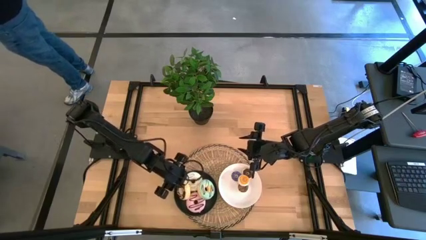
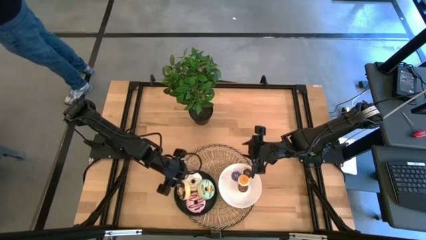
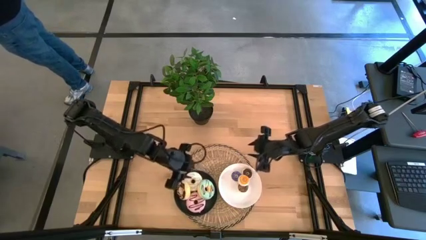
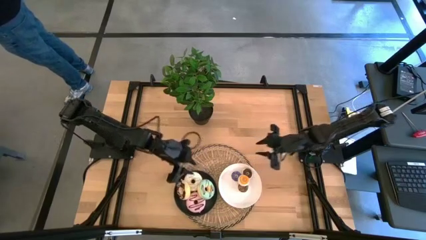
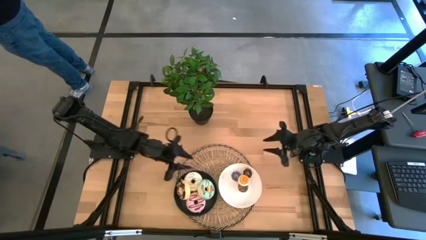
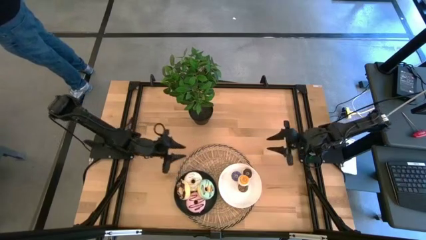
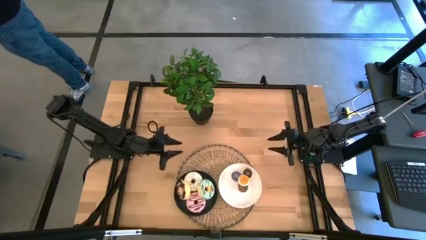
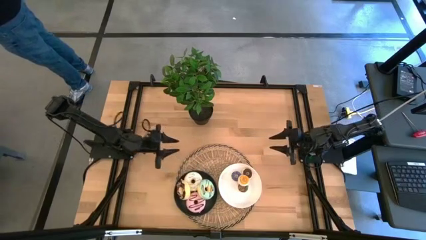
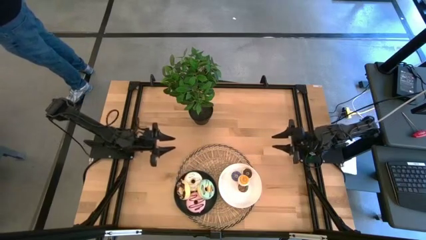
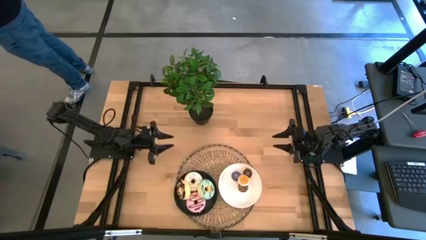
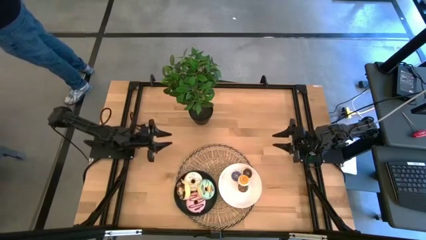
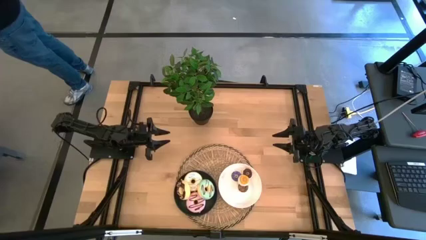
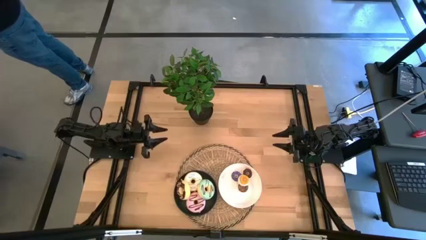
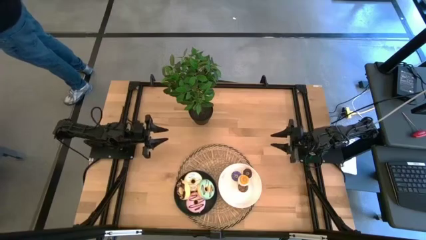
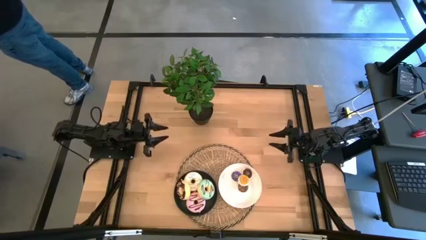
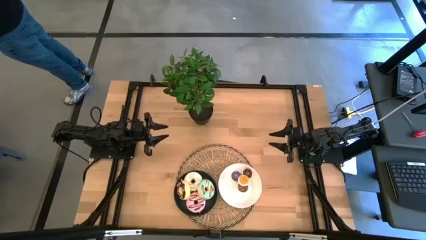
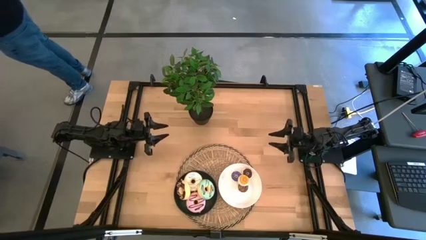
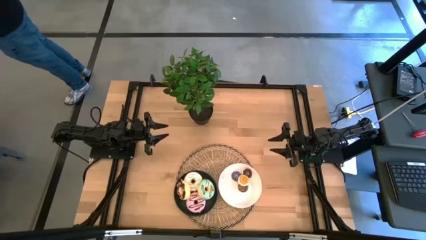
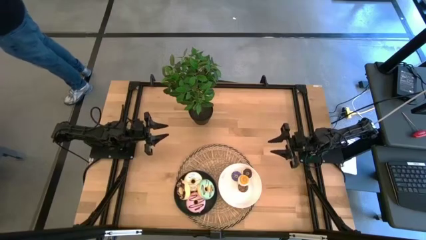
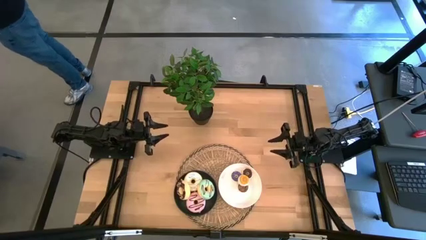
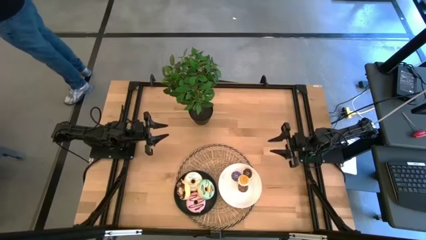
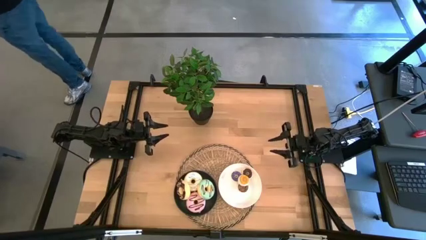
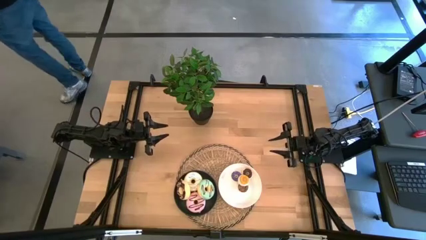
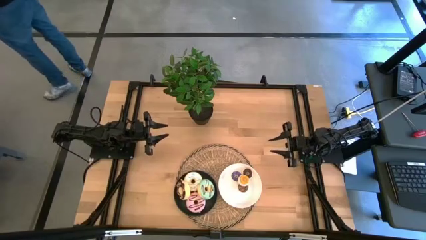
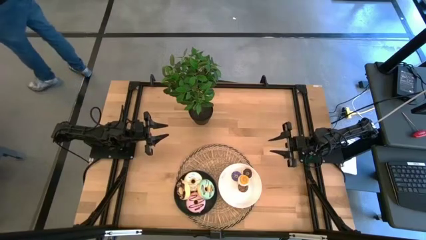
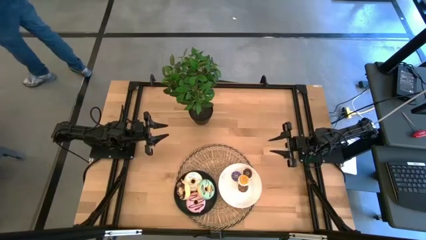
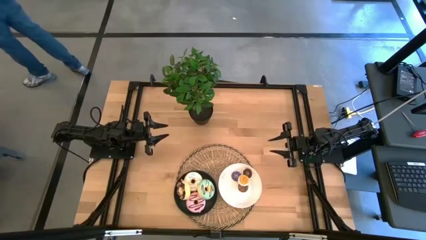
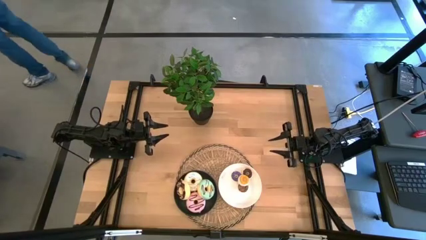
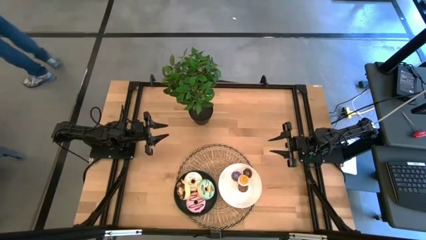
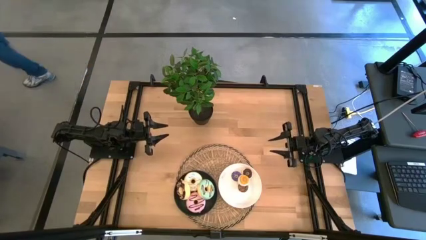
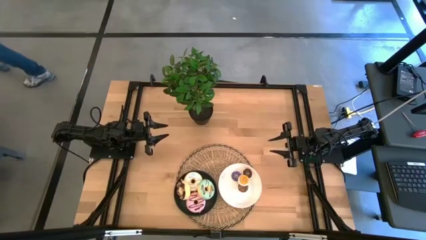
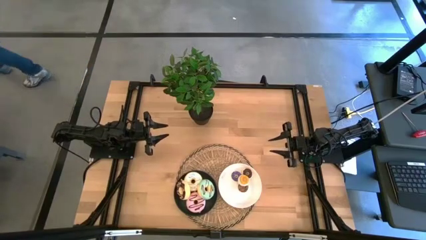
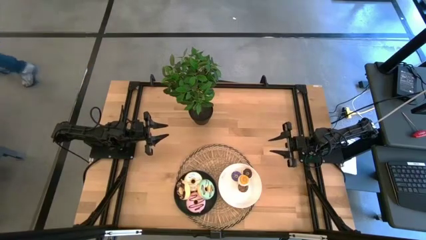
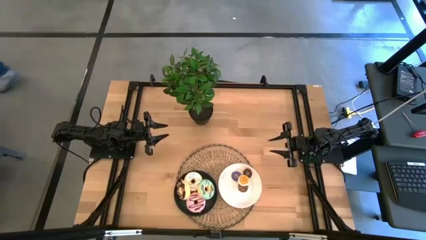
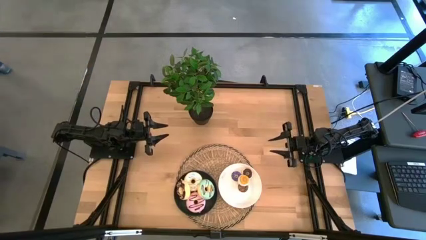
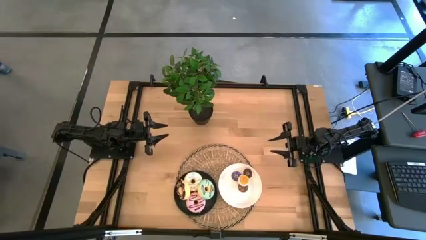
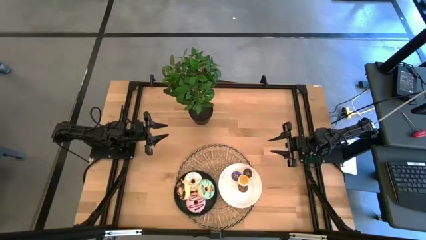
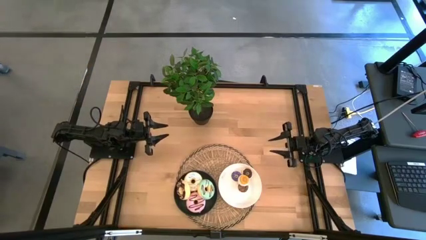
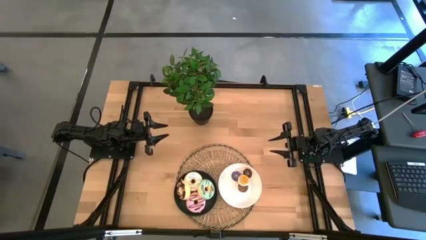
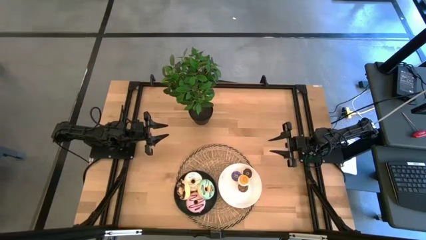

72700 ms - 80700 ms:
Task: Pick & Place donuts
Return to Home Position

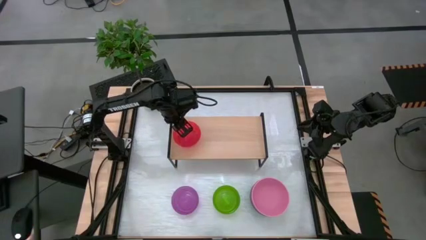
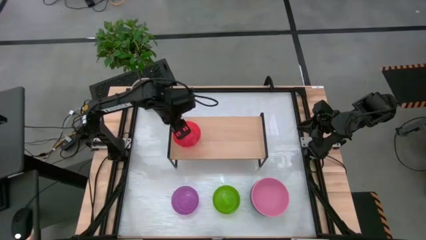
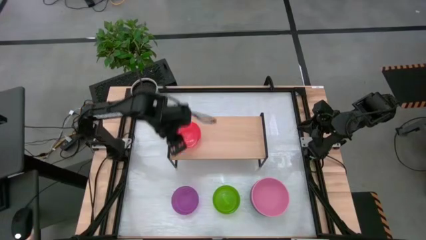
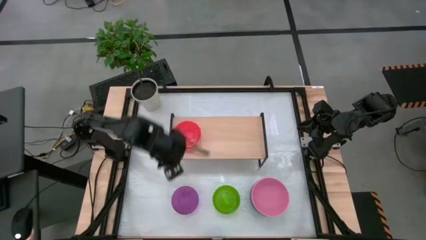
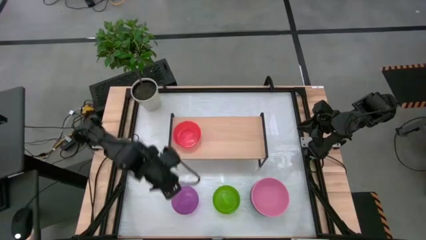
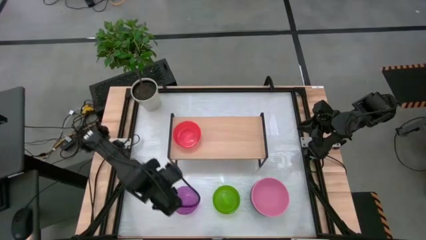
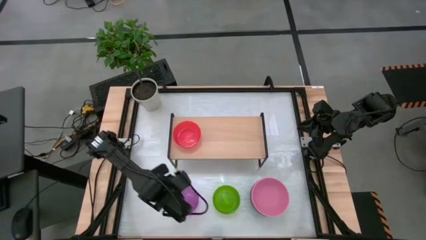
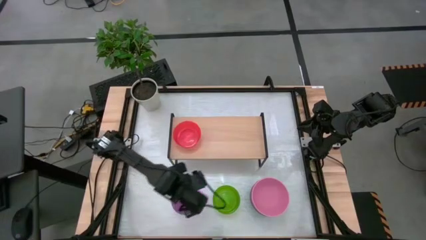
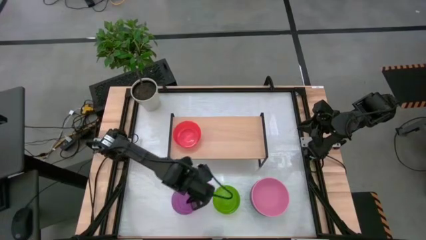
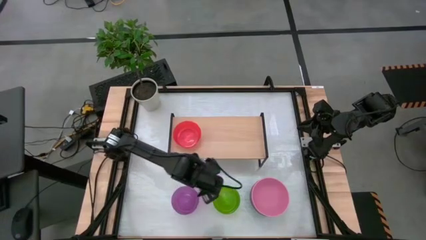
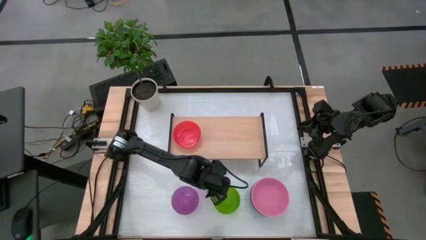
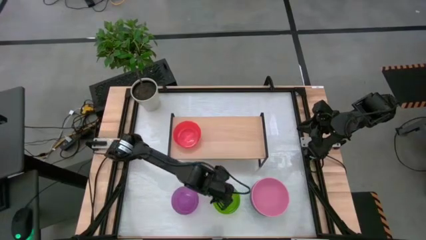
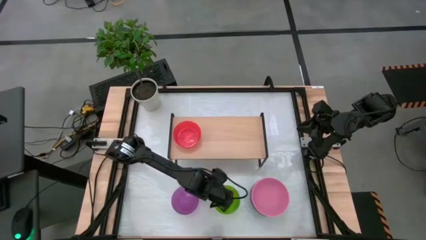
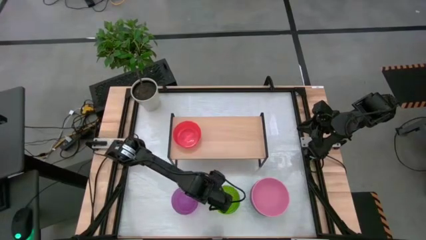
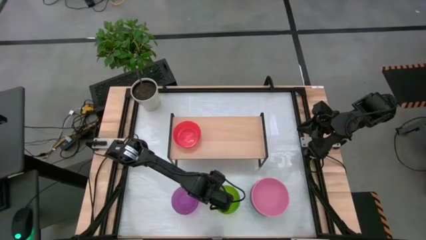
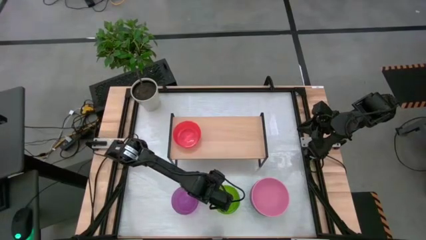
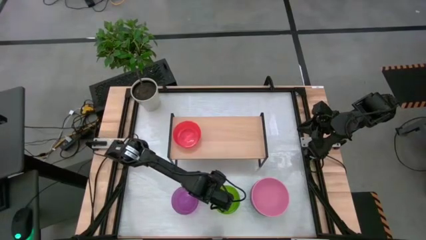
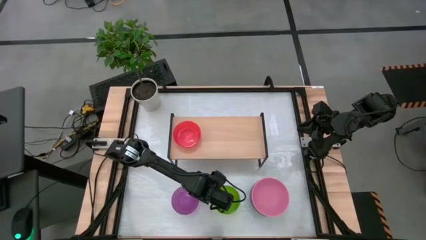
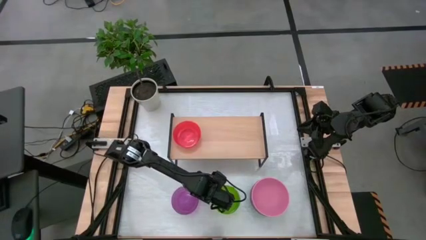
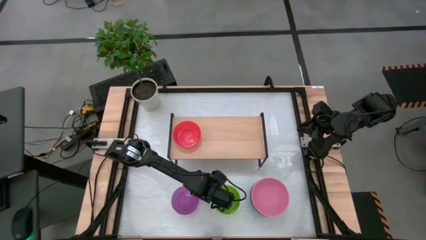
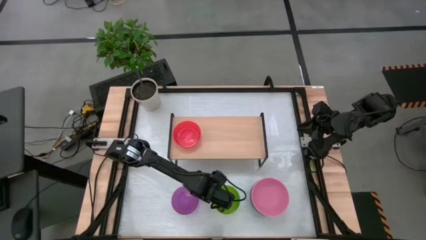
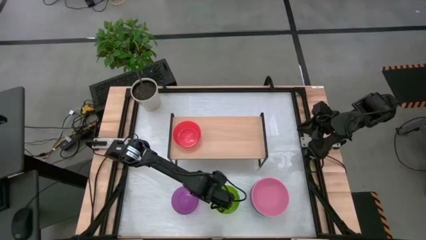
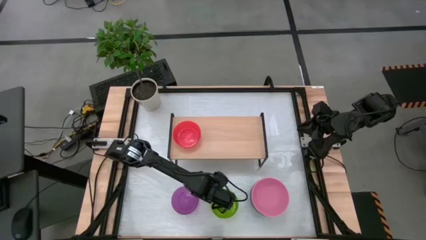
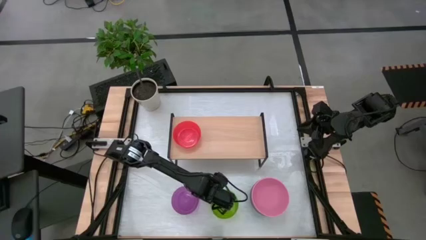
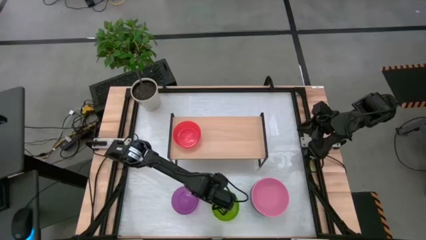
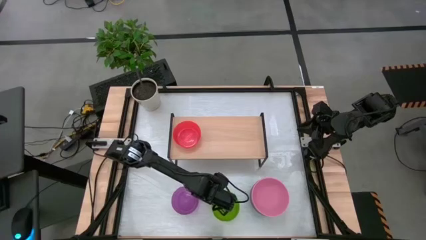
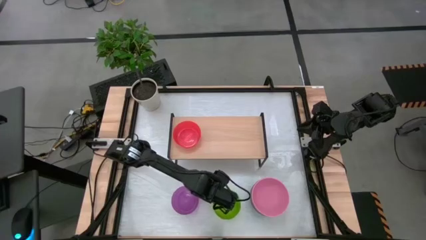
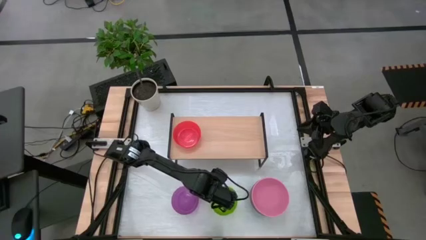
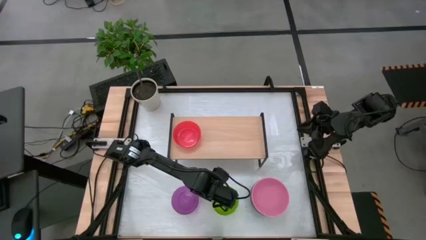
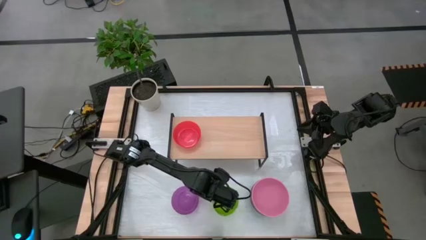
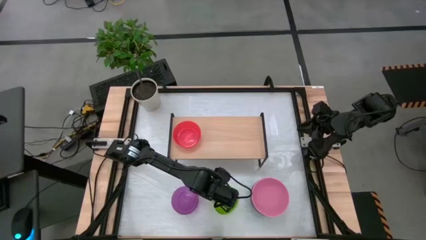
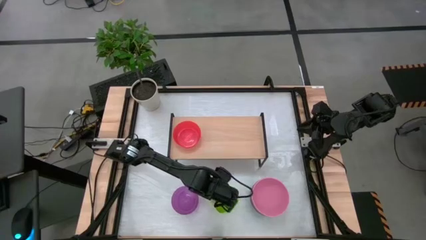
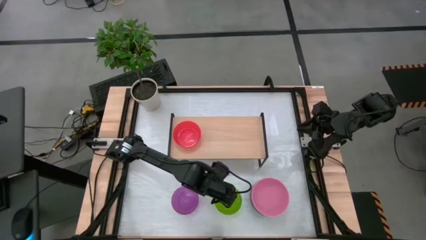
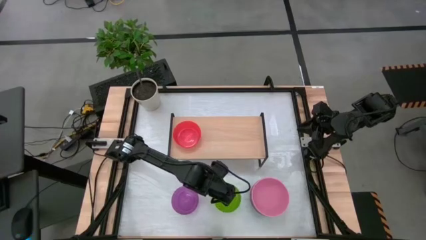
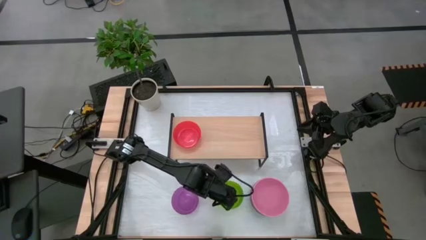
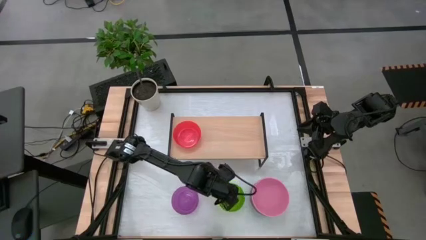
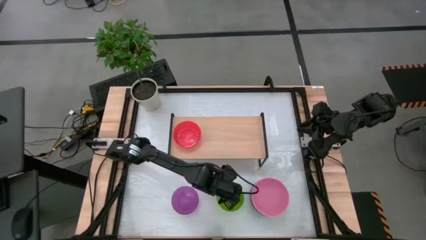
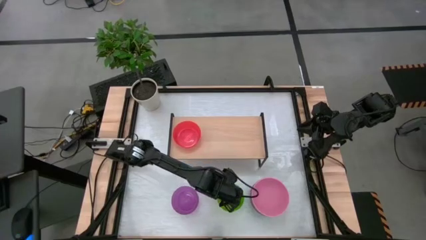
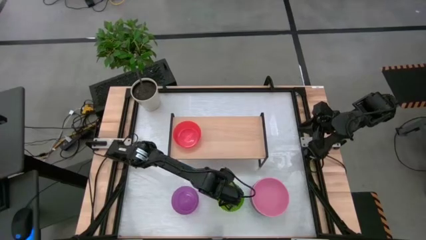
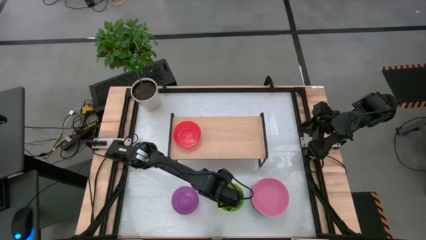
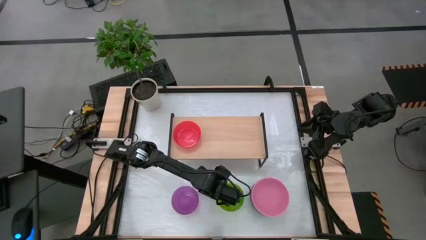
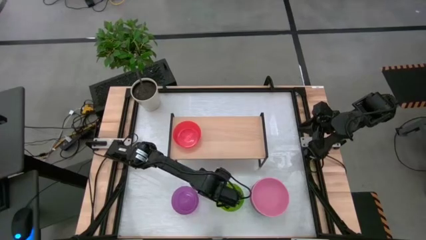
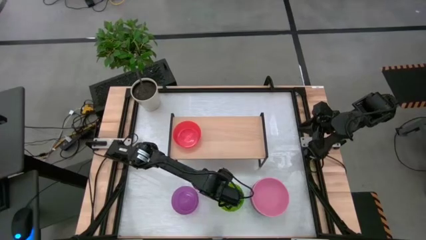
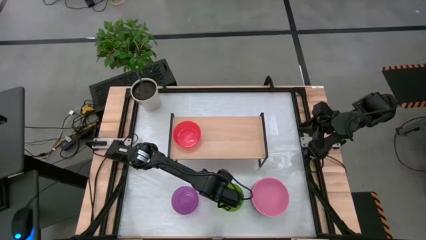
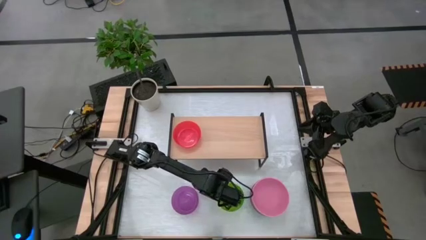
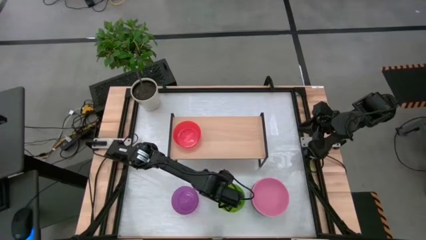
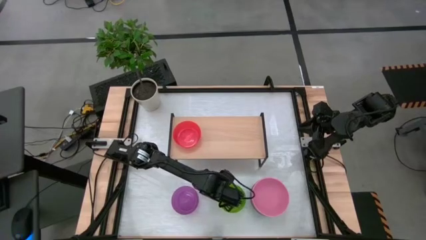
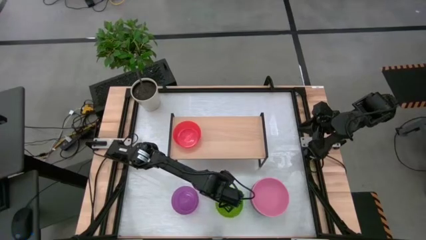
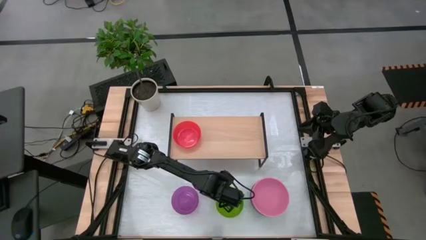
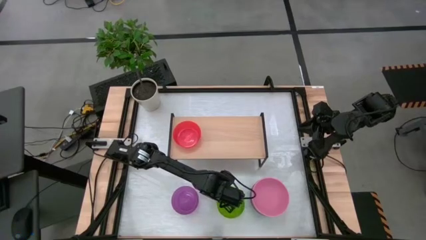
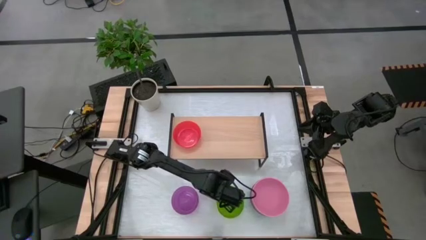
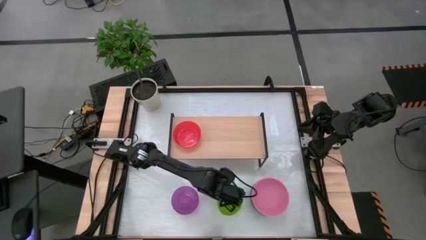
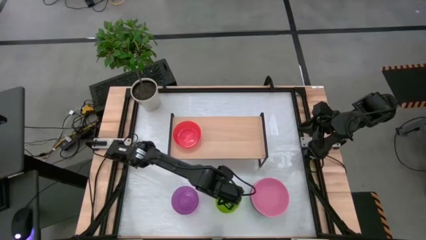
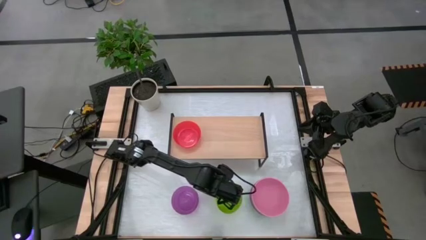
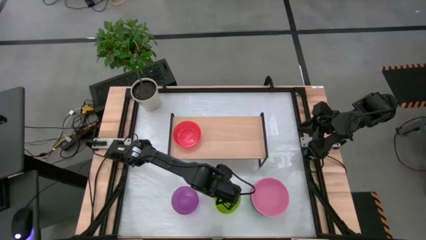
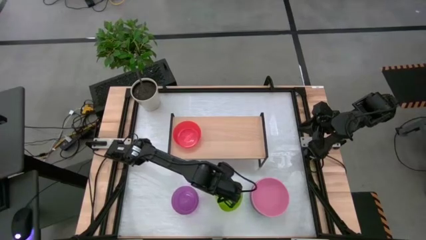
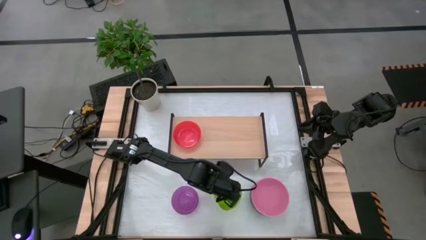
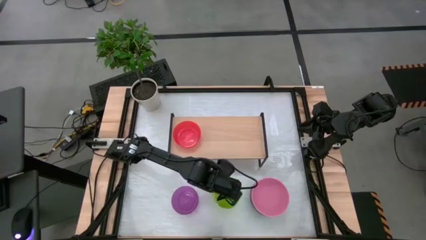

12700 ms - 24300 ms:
Task: Place and stack bowls onto a shelf
Stack the small green bowl on top of the red bowl on the shelf
